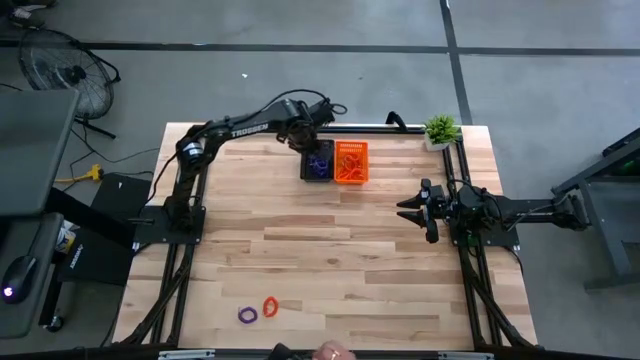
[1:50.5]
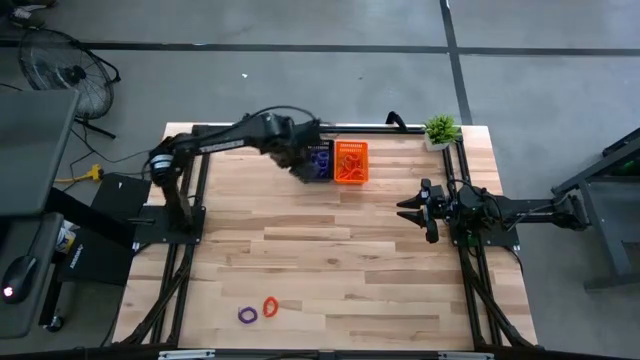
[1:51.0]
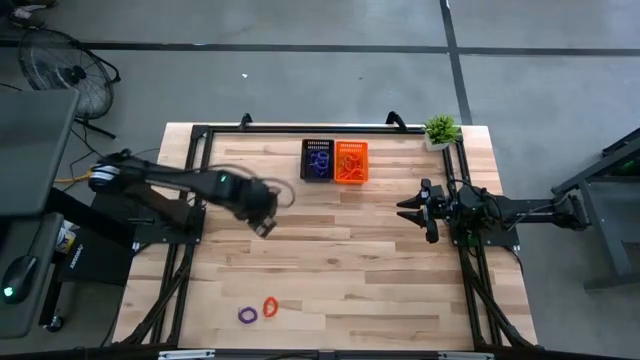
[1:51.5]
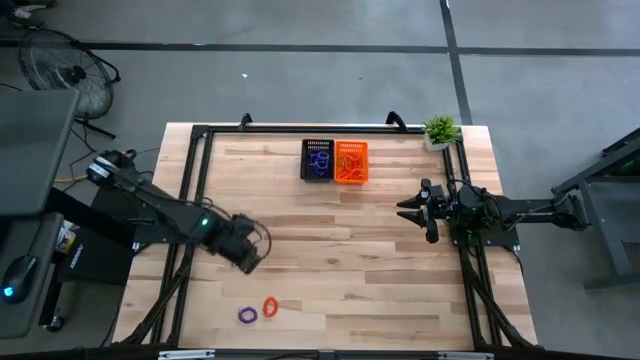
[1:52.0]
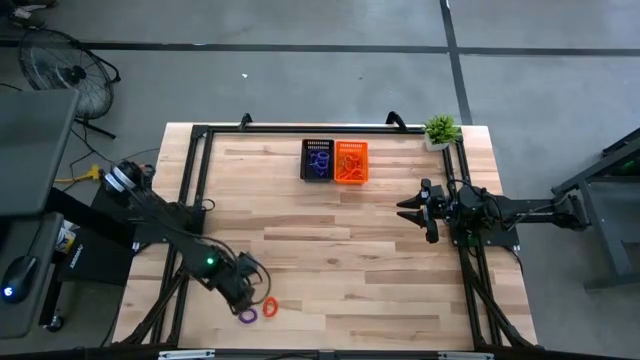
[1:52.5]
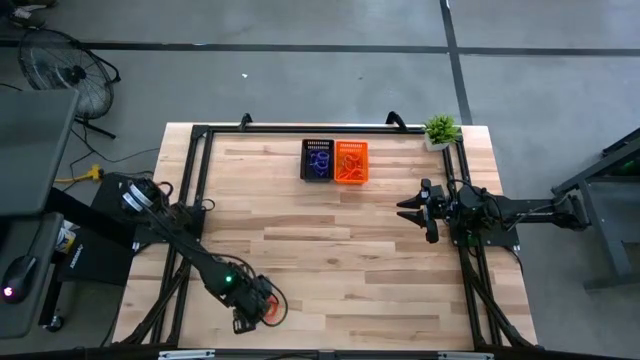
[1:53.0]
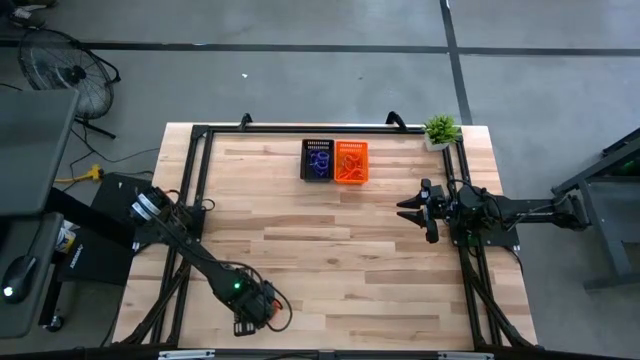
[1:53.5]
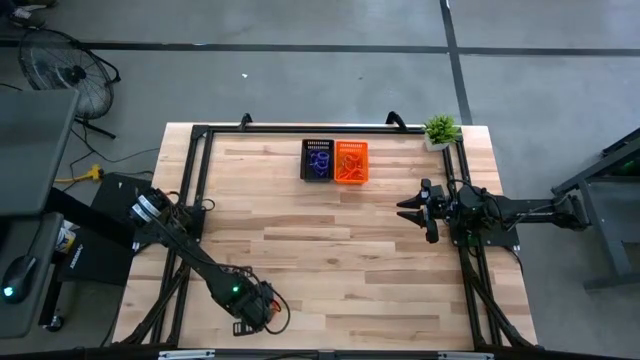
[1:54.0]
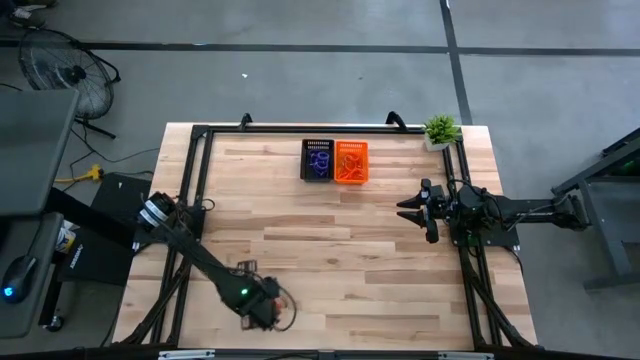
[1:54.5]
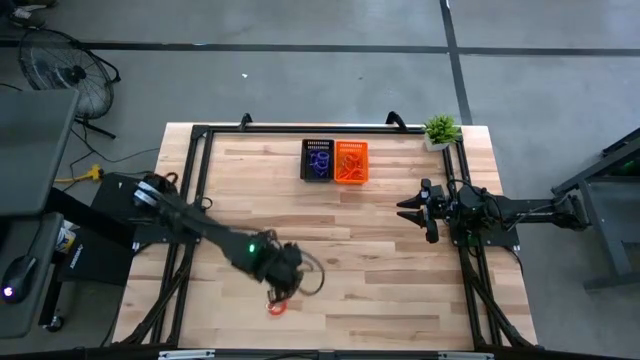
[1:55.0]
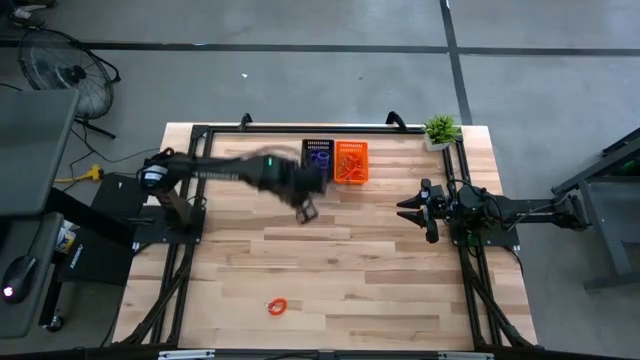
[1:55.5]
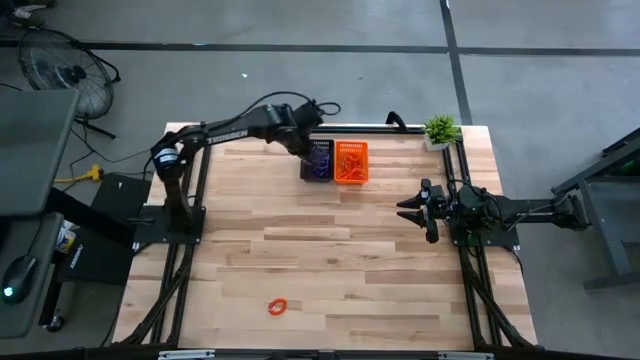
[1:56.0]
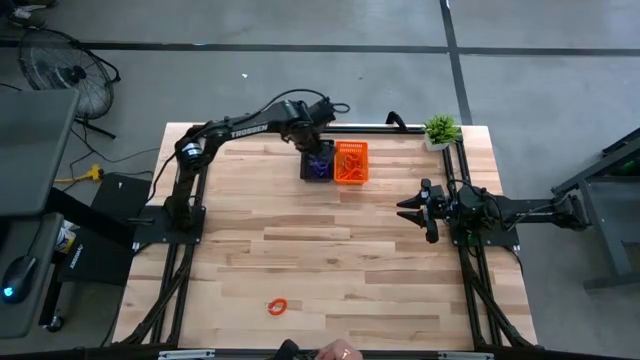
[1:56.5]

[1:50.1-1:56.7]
Task: Sort spring keychains
Put the purple spring keychain in the black bin

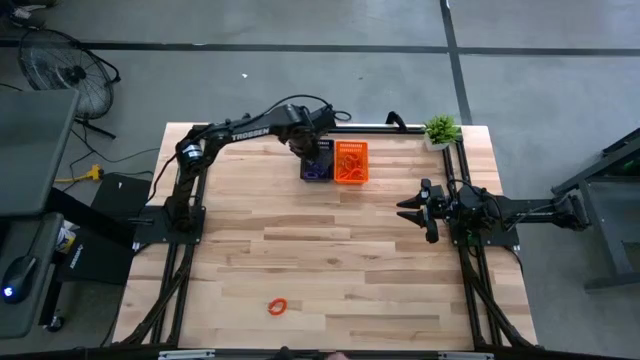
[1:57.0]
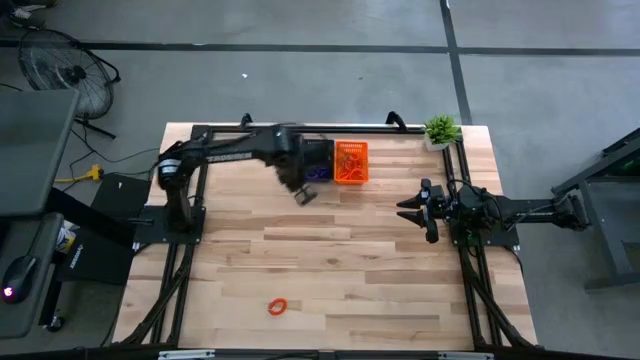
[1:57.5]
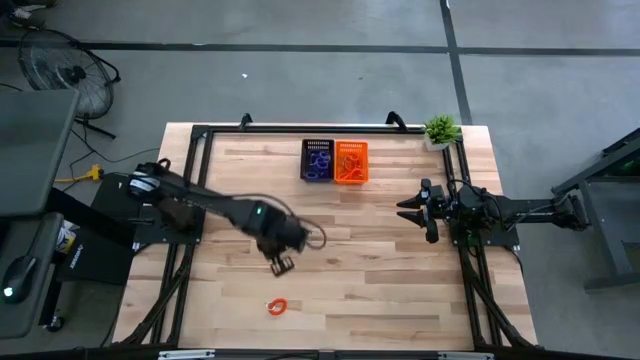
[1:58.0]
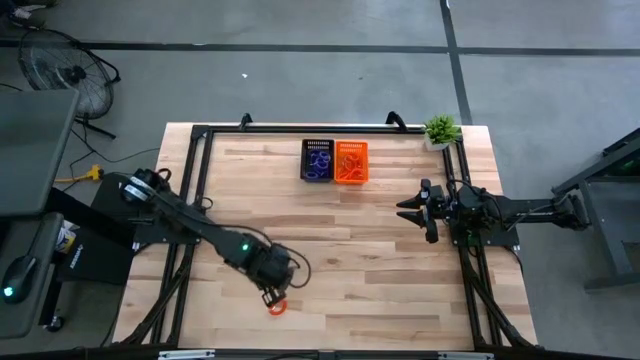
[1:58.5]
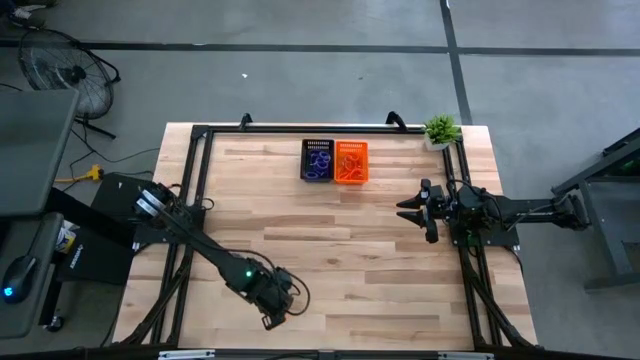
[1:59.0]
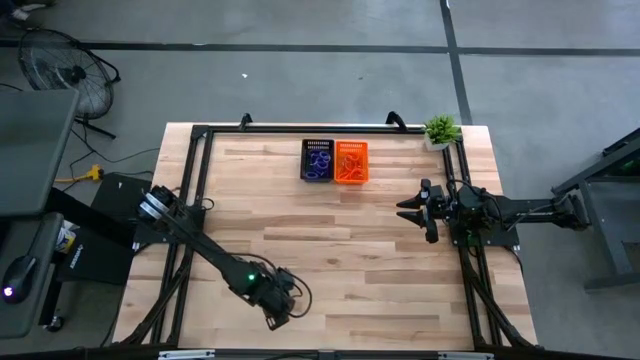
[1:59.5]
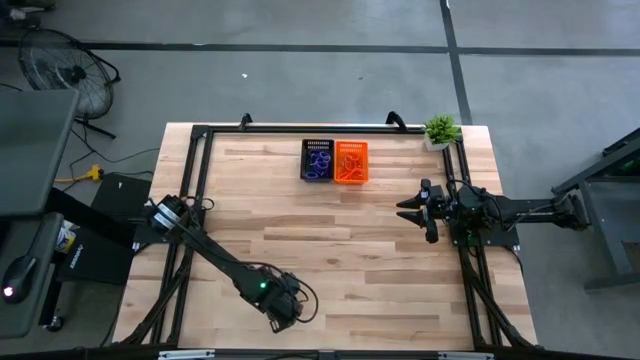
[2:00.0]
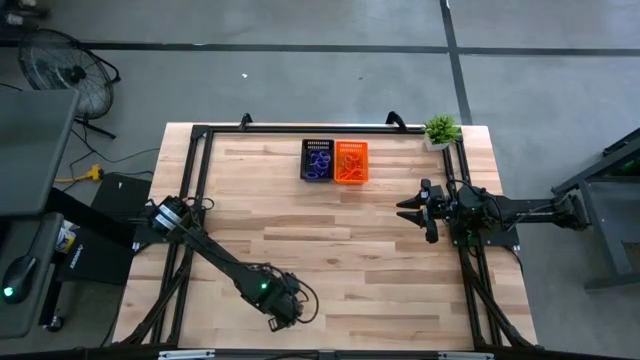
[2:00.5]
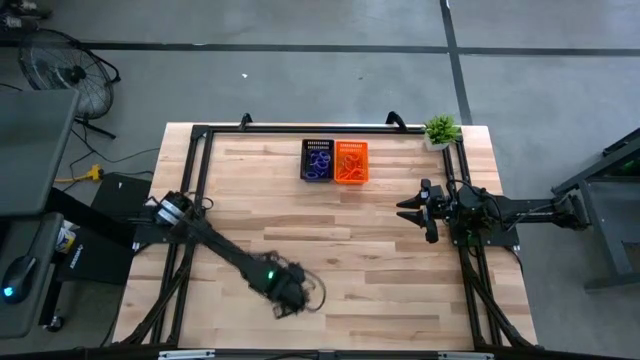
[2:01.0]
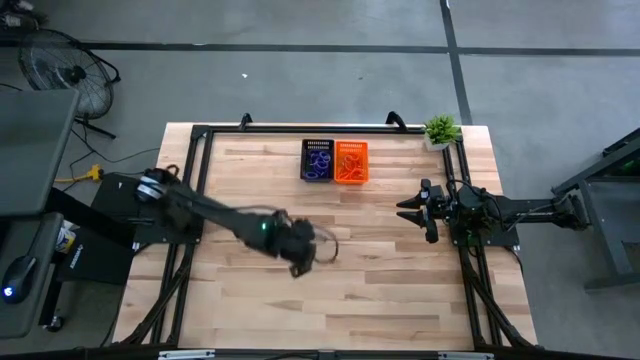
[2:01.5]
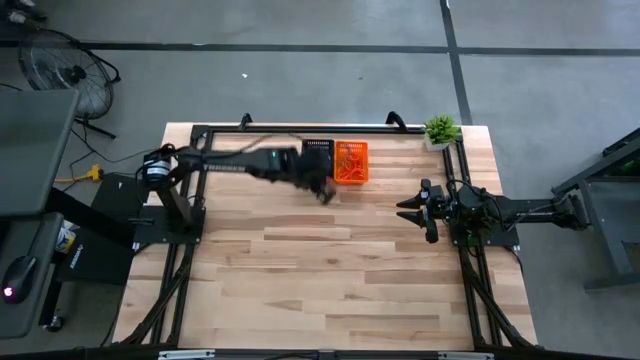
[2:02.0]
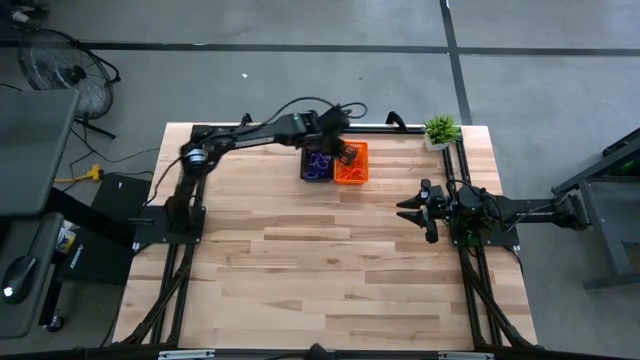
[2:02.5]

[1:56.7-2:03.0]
Put the orange spring keychain in the orange bin

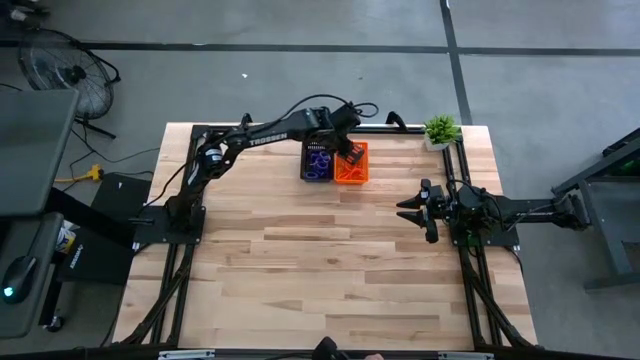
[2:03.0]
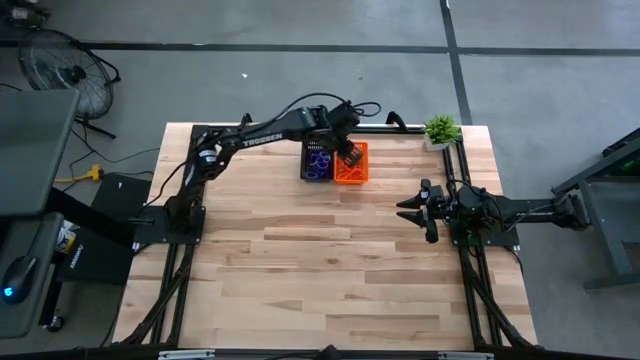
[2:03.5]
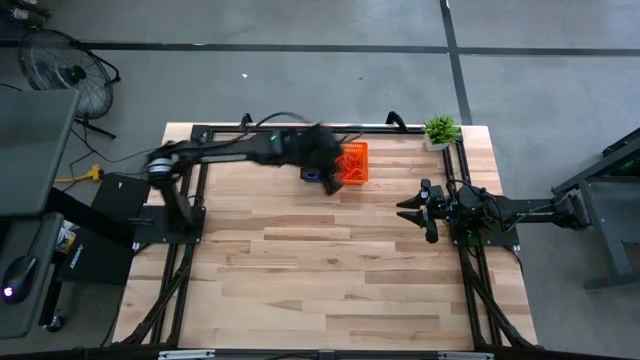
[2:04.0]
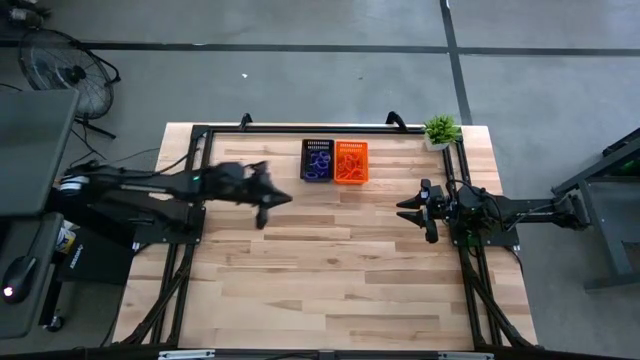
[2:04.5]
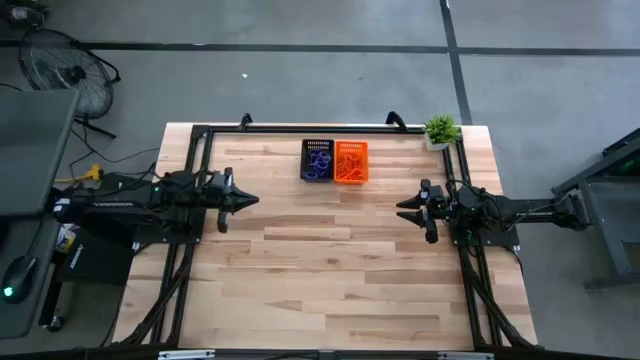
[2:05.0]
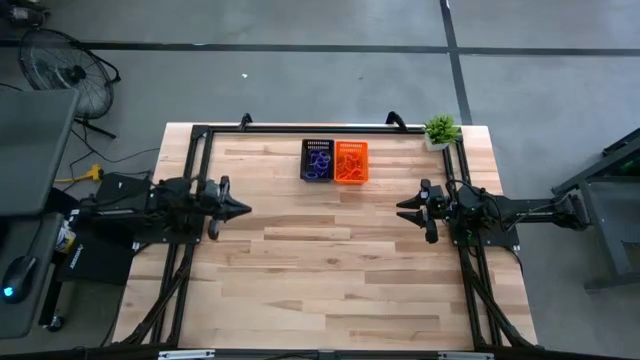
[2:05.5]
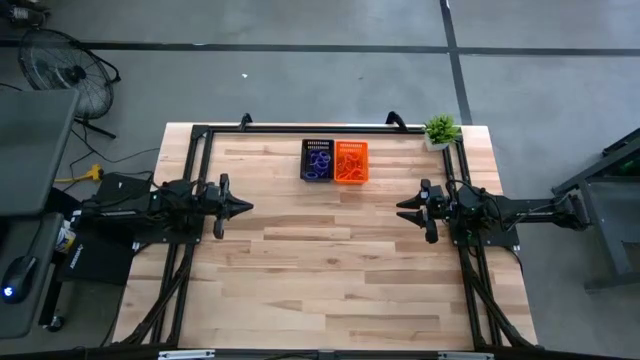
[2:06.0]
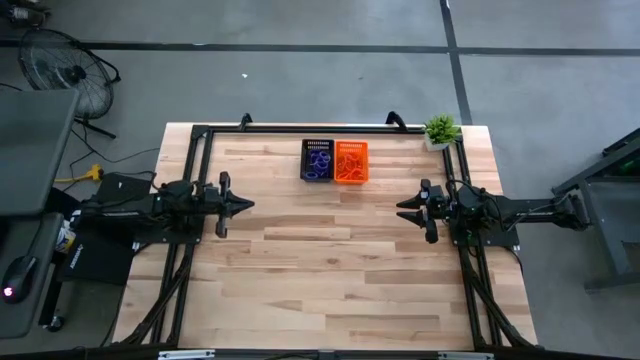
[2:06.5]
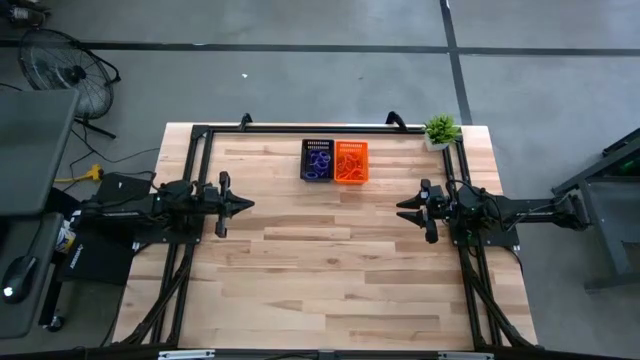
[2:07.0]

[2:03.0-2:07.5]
Return to Home Position

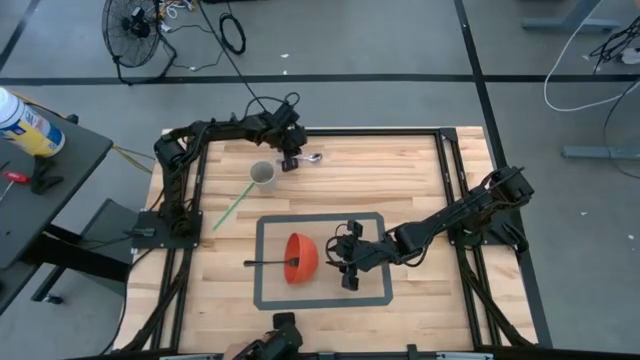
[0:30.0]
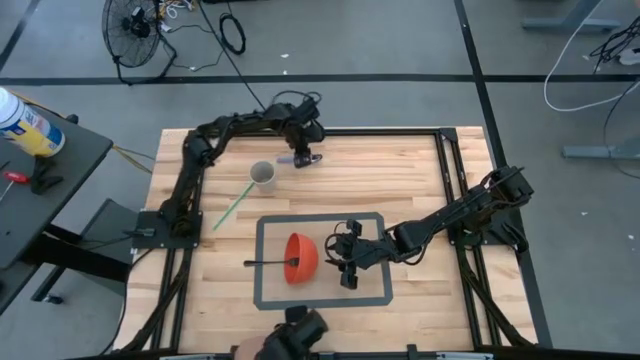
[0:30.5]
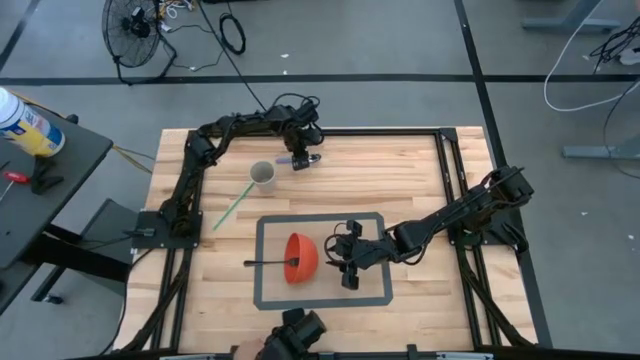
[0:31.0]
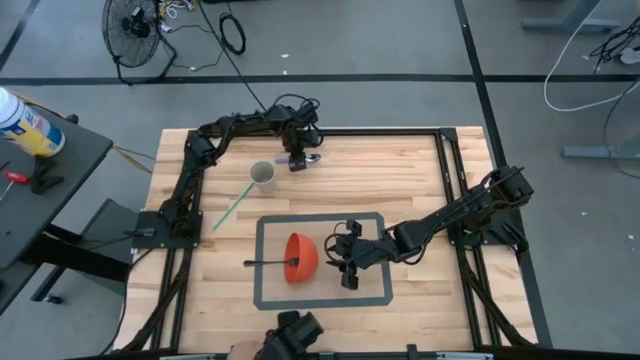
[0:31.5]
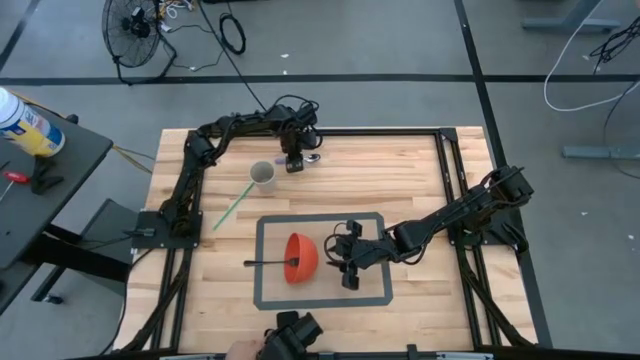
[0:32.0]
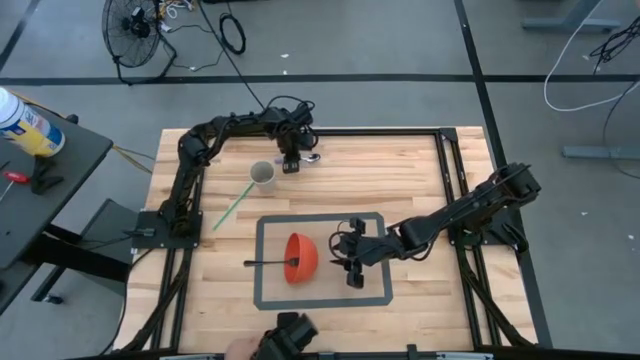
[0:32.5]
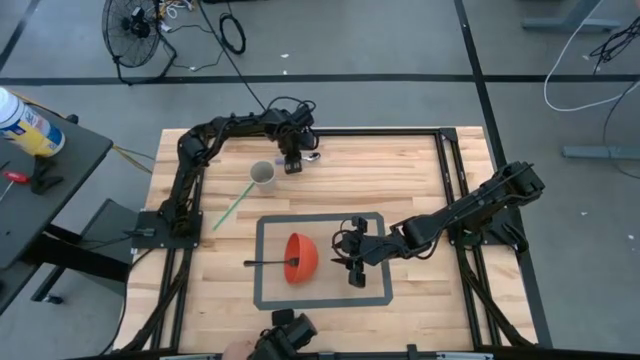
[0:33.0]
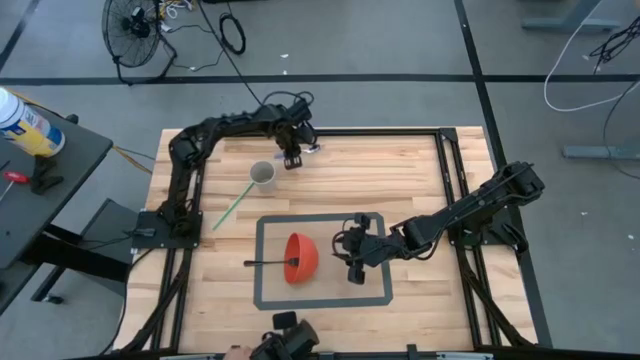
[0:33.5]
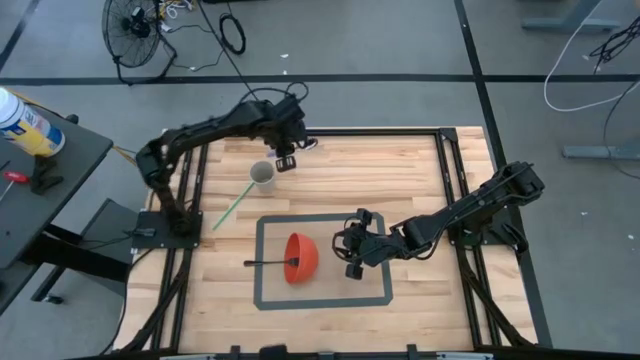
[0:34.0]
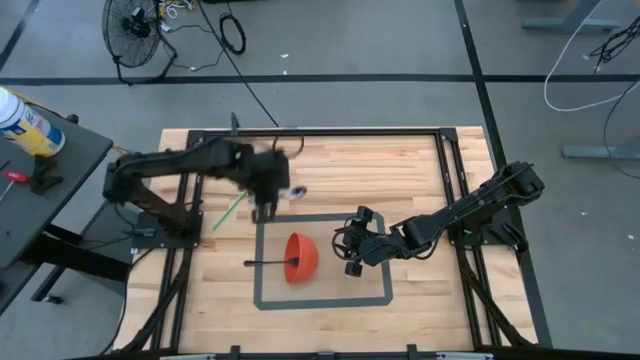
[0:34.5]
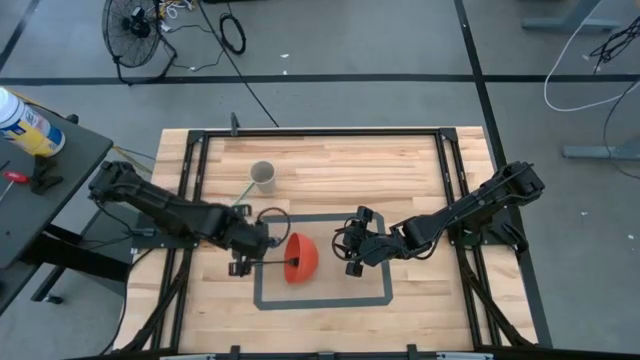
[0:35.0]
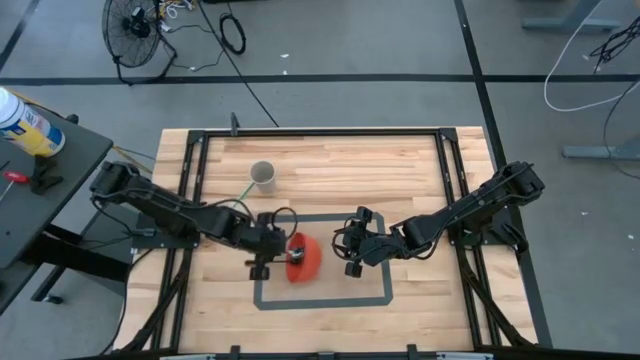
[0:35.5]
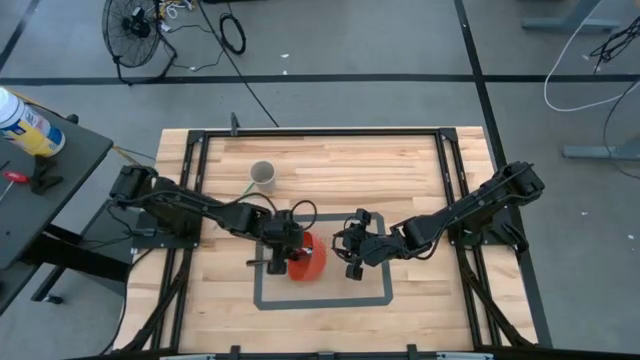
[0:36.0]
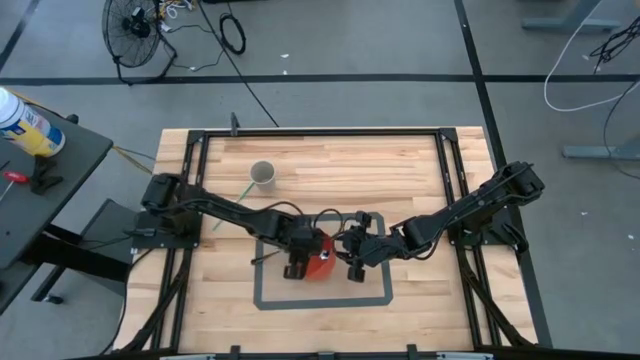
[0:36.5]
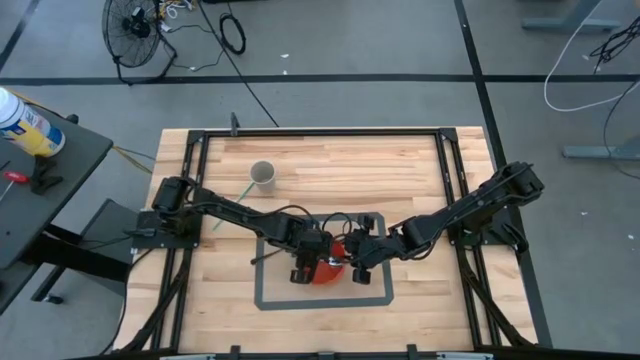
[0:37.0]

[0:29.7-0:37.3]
Task: Pick & Place Utensil
Put the purple spoon into the orange bowl on the brown table mat
